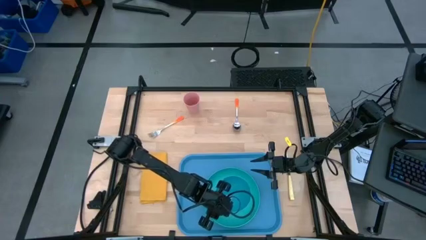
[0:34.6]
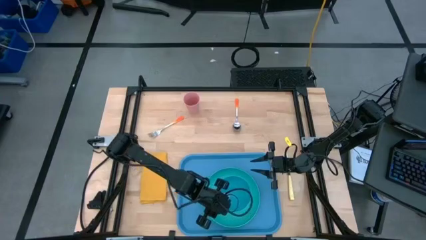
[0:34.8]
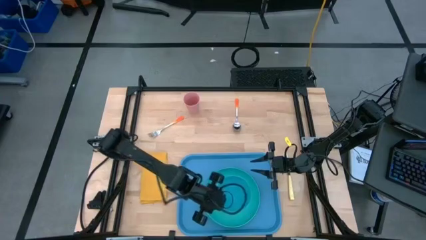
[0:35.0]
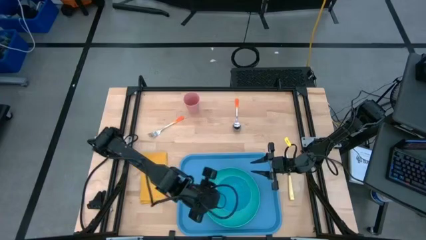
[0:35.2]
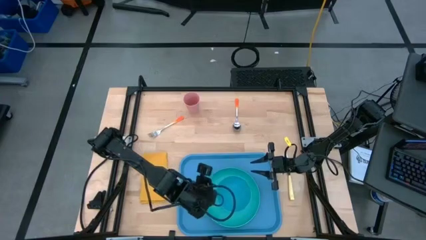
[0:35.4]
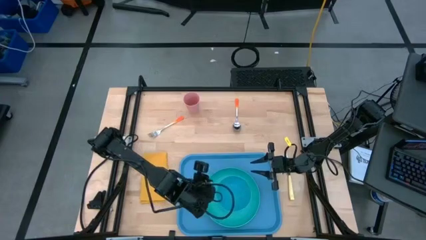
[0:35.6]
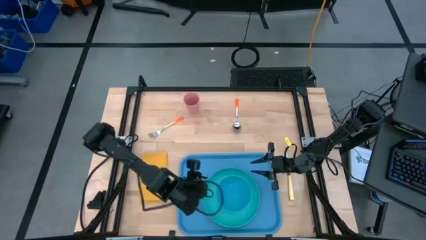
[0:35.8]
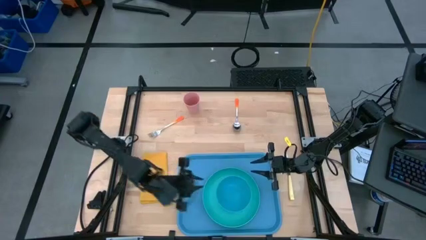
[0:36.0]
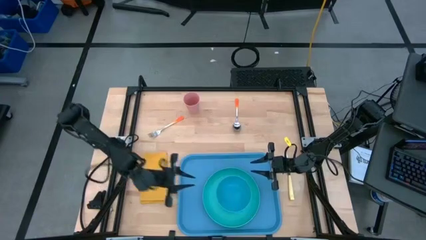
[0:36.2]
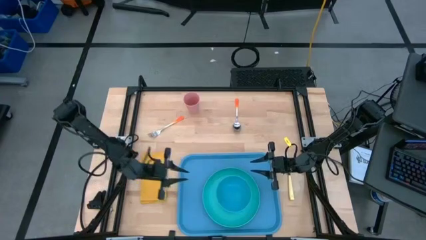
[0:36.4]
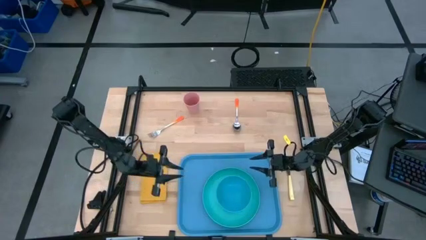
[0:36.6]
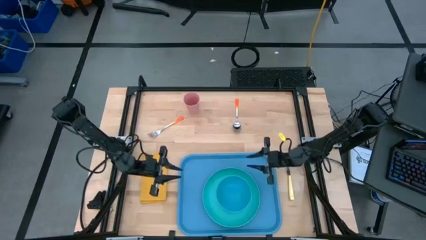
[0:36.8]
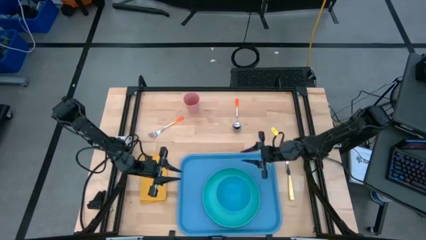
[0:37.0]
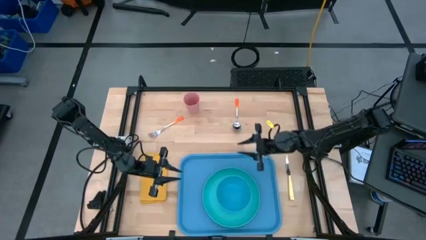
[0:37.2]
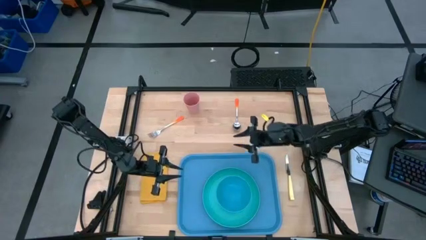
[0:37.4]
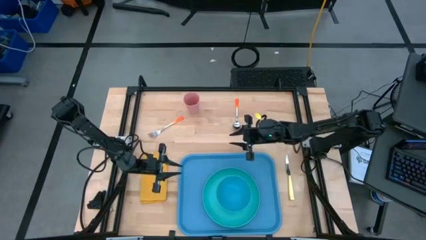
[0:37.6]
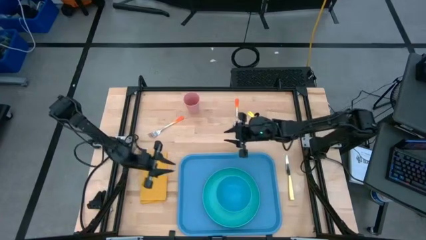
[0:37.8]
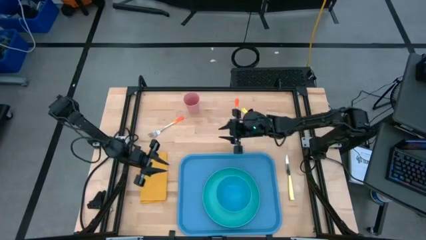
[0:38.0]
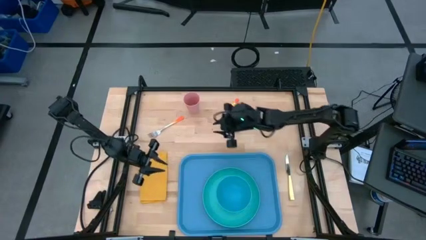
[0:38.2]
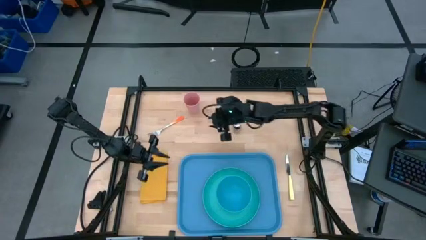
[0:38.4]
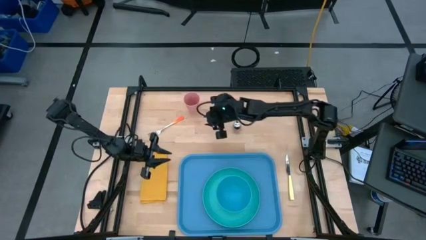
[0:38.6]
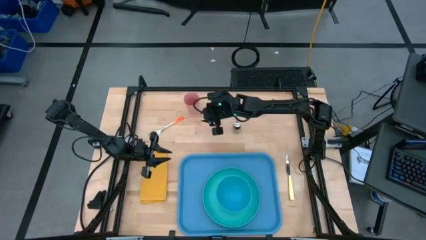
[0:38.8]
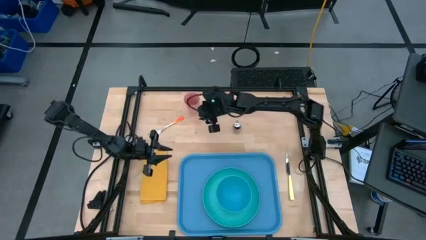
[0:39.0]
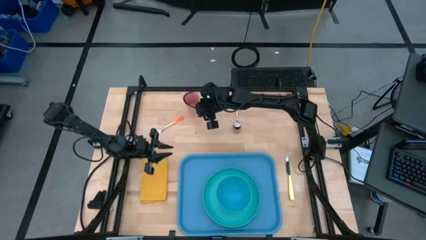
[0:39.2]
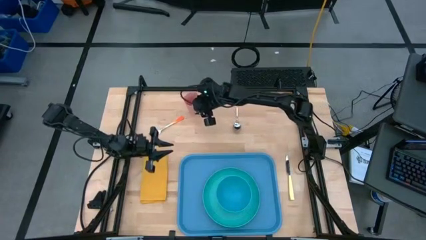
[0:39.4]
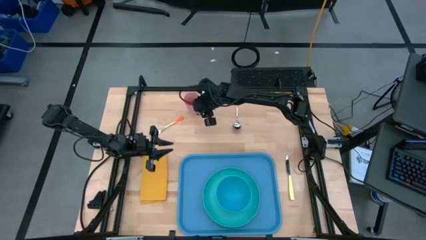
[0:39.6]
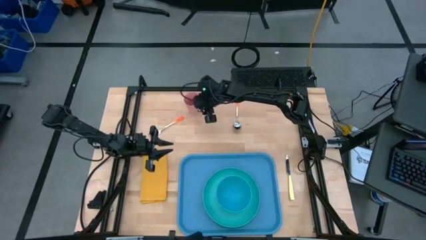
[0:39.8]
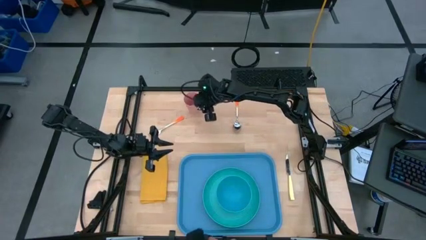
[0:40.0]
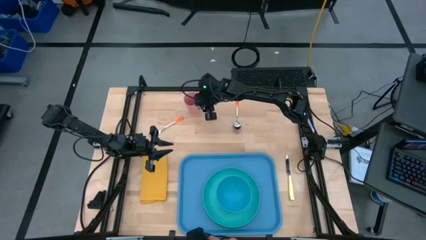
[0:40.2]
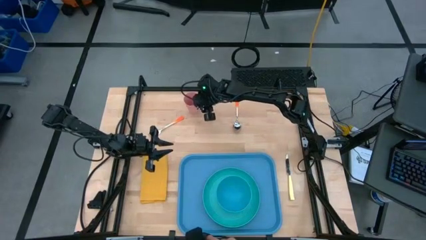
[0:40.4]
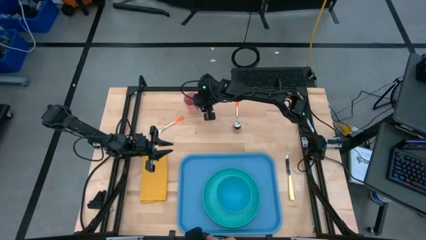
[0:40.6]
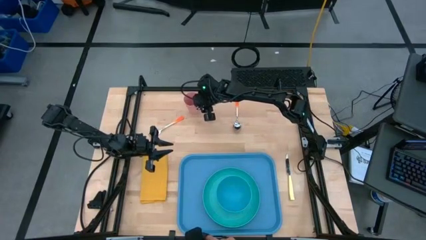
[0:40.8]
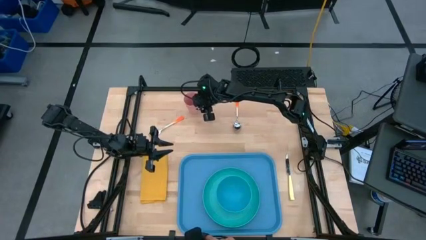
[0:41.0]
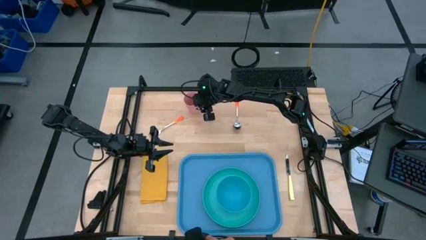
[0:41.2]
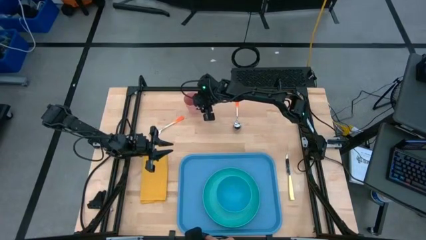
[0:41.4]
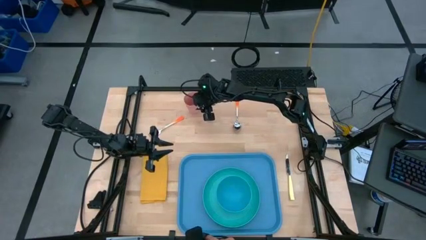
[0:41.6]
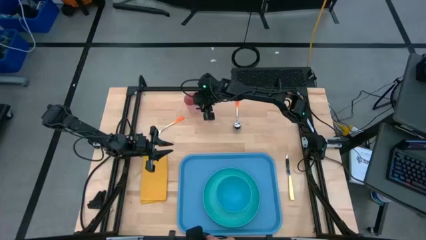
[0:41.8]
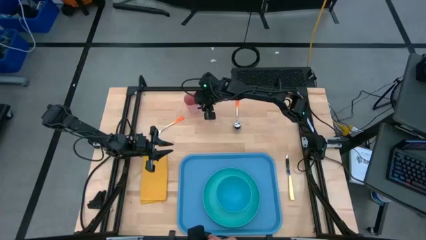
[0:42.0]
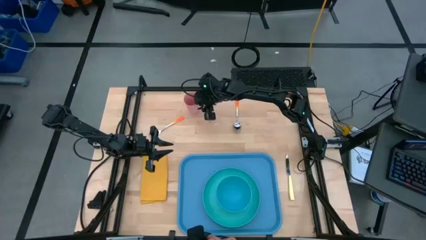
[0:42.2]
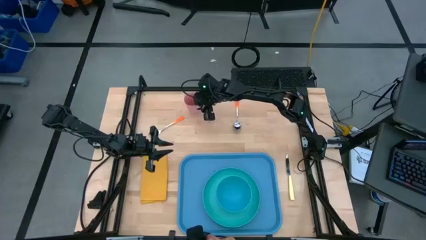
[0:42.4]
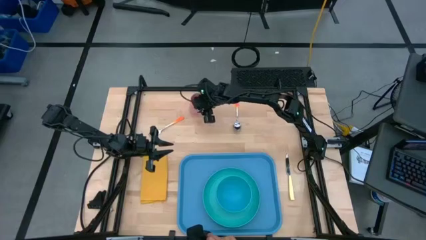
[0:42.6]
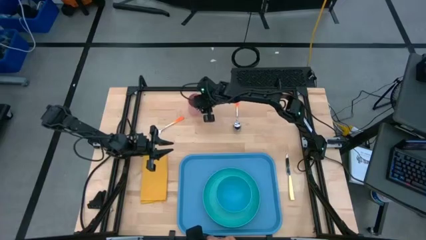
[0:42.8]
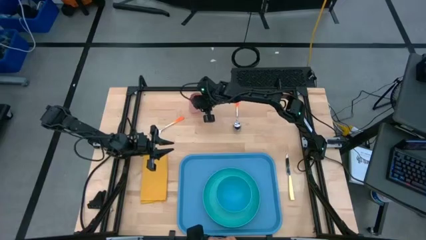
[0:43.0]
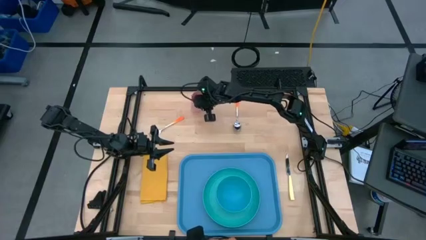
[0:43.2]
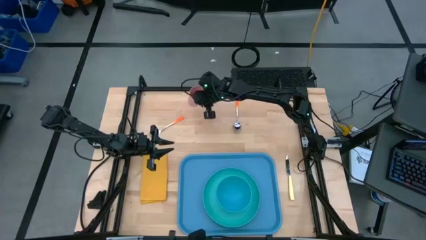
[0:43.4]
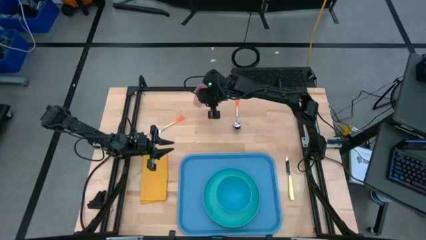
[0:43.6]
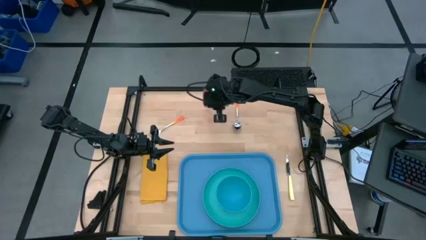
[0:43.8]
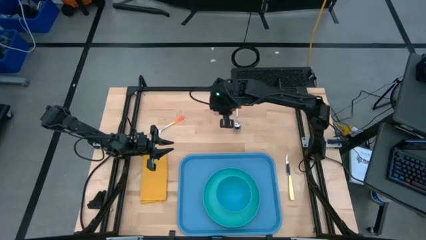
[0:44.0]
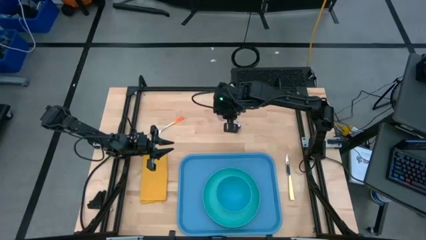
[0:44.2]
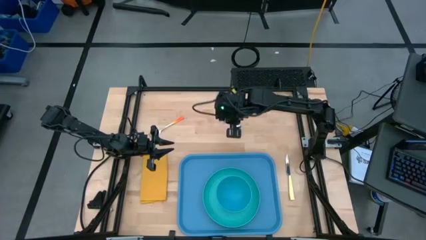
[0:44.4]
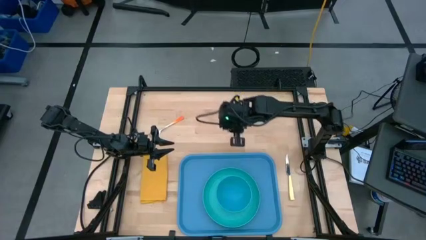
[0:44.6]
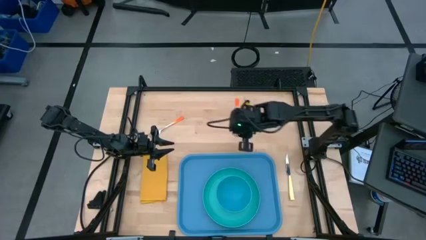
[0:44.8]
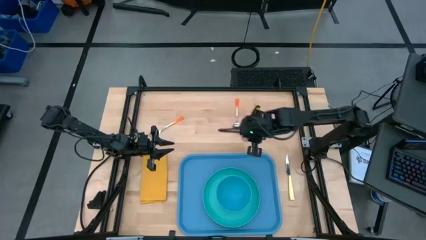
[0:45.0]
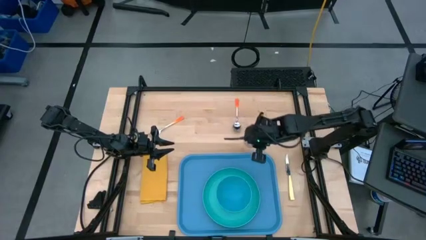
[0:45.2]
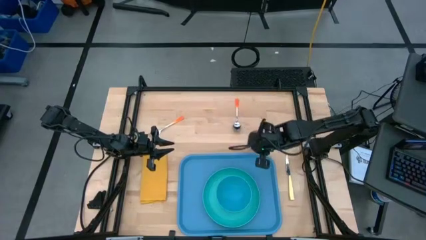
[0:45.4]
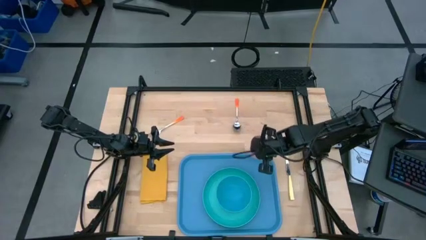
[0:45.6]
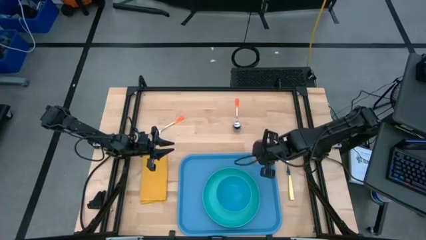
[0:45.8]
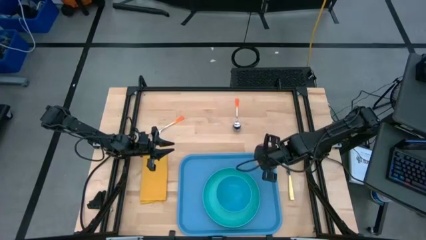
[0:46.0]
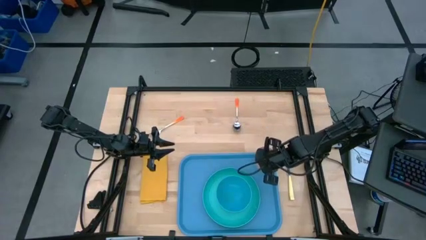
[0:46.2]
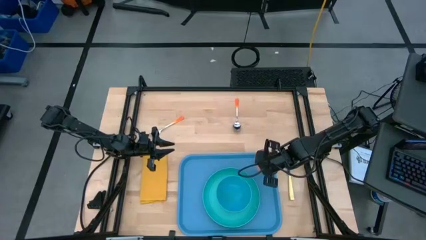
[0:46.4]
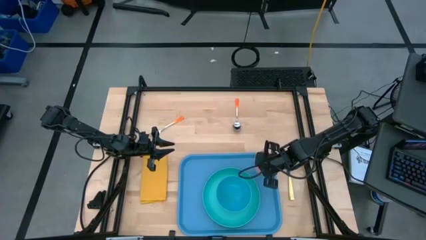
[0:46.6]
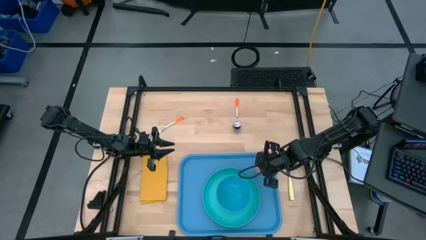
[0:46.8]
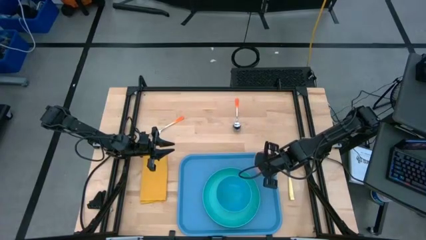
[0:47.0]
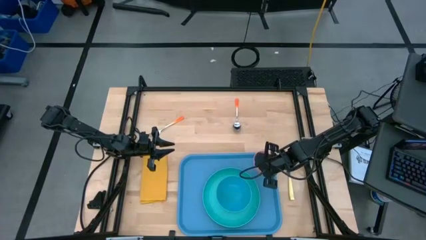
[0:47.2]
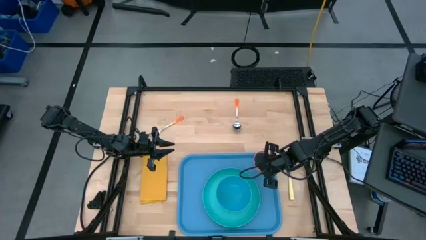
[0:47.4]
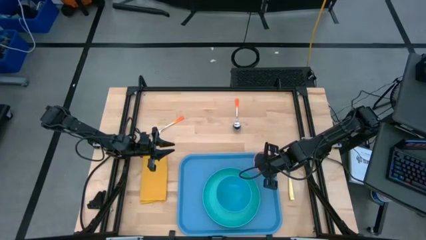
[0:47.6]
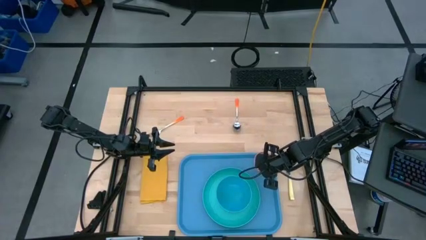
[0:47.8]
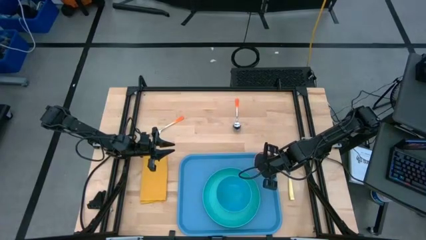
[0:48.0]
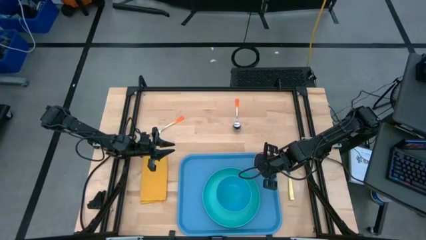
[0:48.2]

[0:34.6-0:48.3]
Task: Set up tray
Put the pink cup on the blue serving tray to the top right of the light blue plate

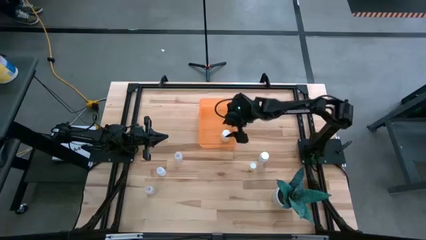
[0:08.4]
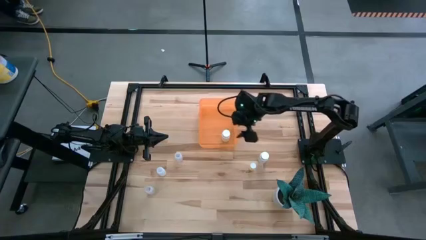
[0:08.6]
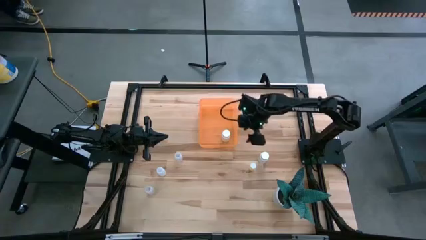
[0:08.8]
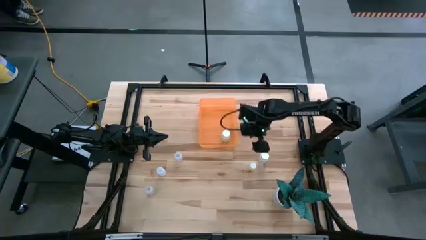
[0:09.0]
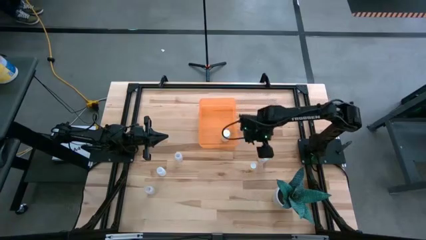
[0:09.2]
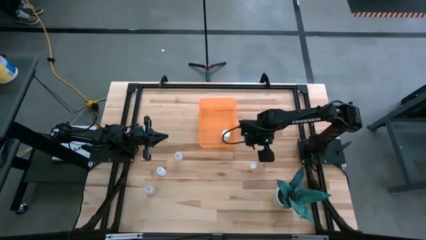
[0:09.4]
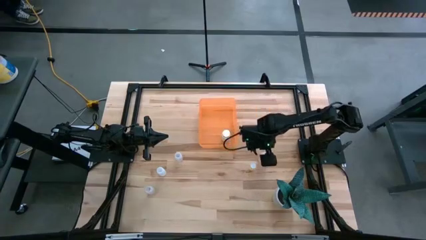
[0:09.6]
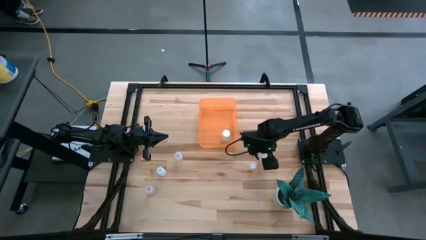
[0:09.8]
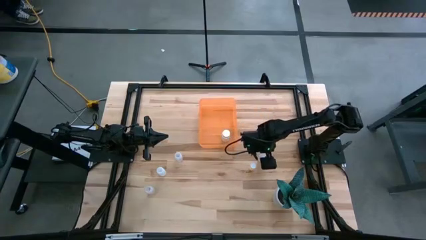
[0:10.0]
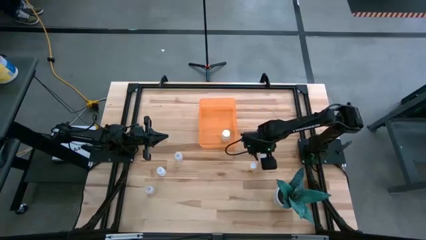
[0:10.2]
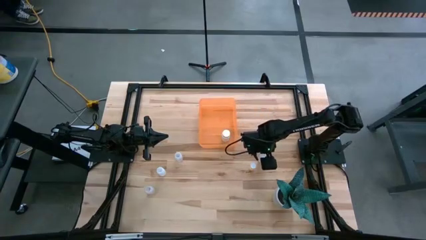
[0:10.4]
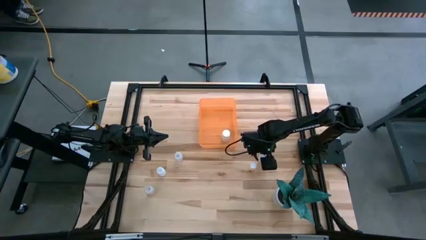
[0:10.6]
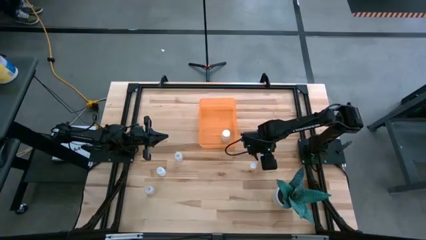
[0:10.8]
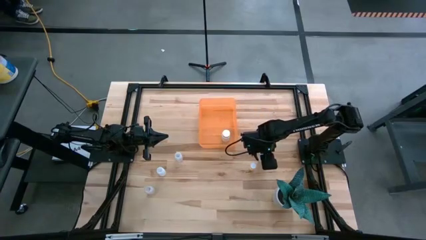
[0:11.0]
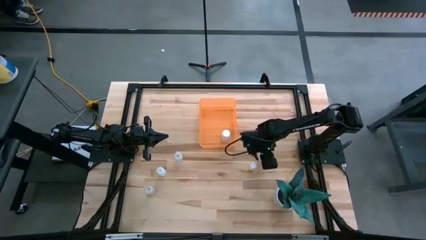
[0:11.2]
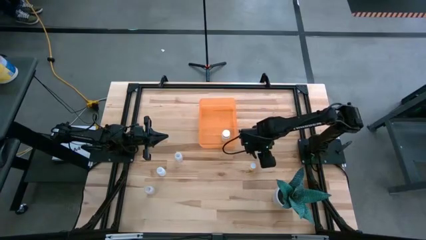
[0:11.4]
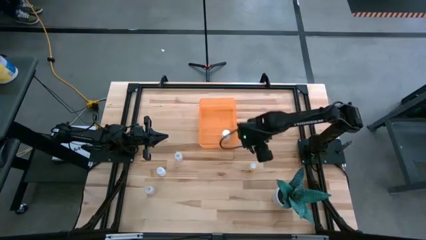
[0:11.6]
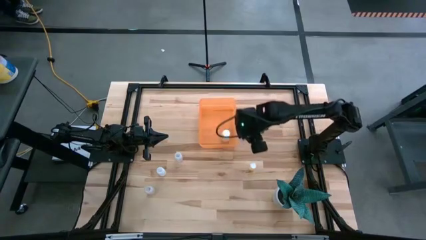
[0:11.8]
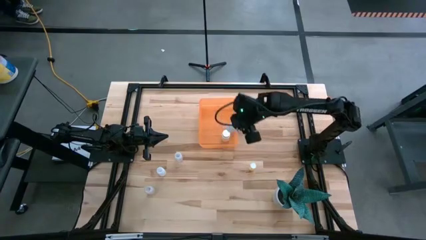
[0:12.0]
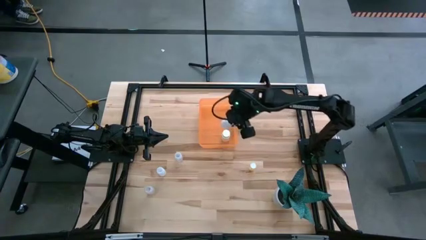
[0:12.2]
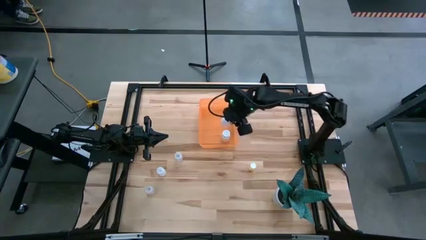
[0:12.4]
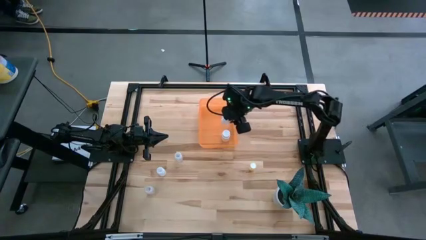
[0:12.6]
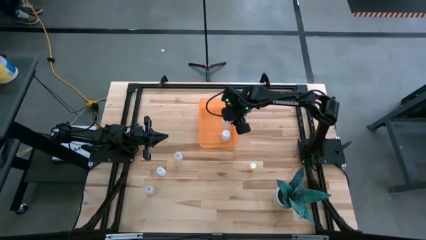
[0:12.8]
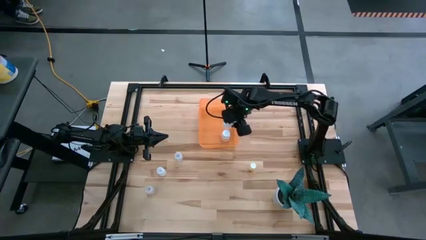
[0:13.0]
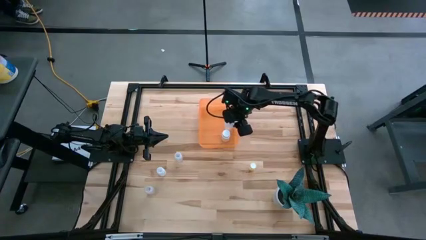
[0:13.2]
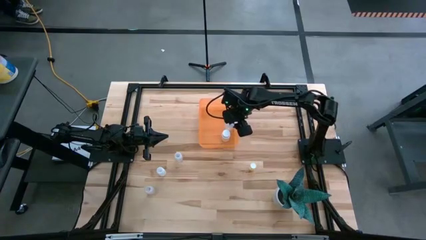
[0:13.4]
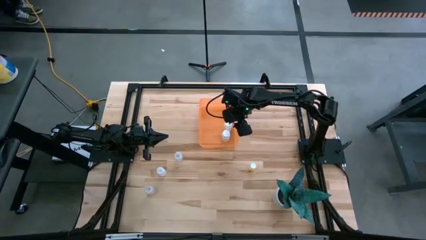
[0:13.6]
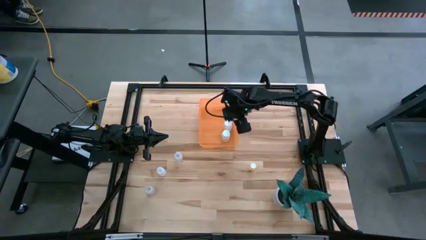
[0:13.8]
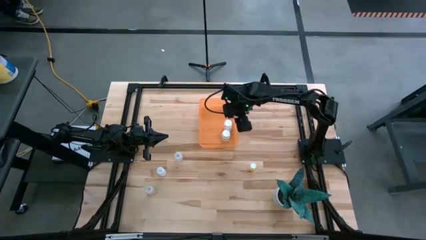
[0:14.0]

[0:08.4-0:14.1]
Task: Pick and place pill bottles into a basket
Put the right white medicine bottle into the orange bin
